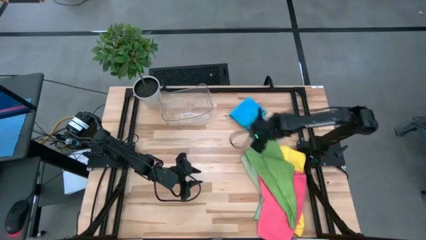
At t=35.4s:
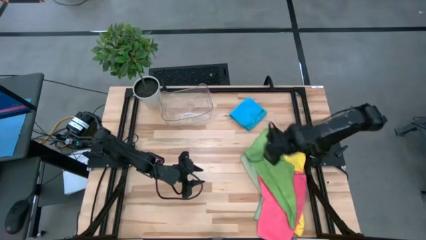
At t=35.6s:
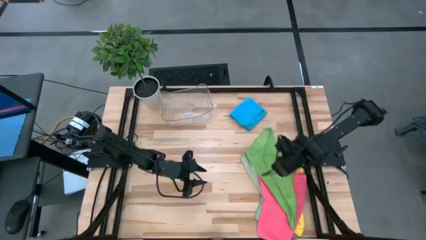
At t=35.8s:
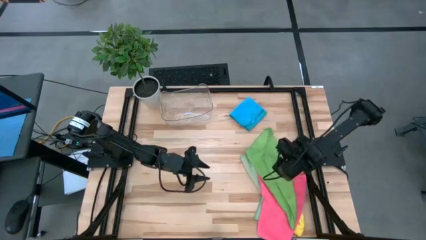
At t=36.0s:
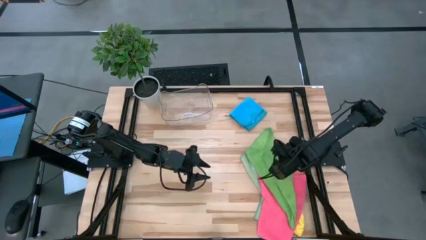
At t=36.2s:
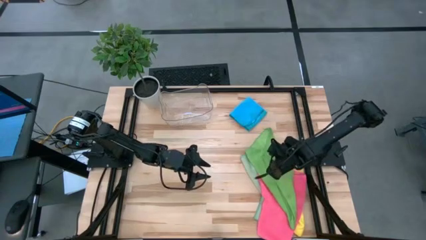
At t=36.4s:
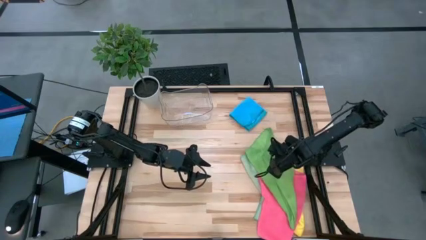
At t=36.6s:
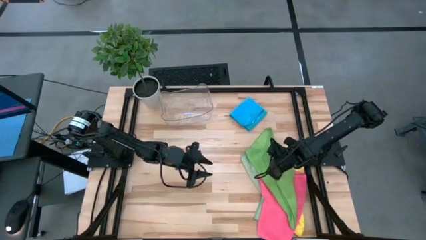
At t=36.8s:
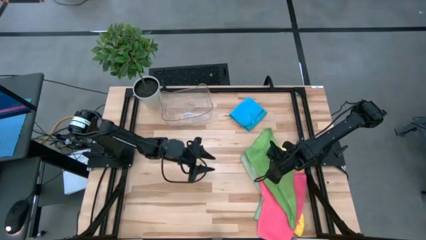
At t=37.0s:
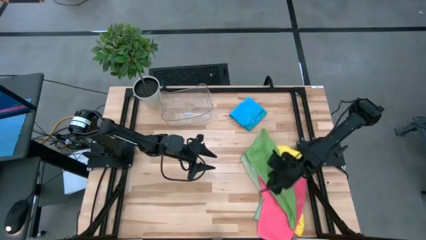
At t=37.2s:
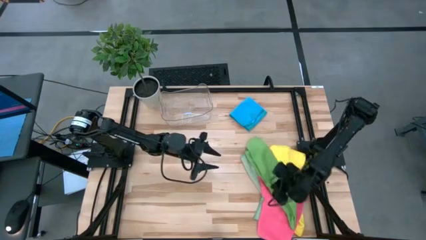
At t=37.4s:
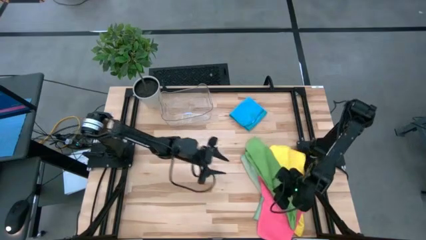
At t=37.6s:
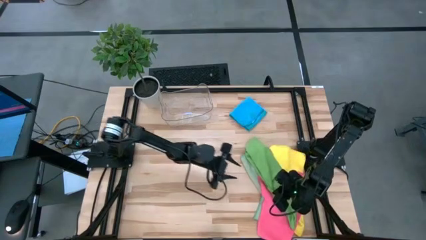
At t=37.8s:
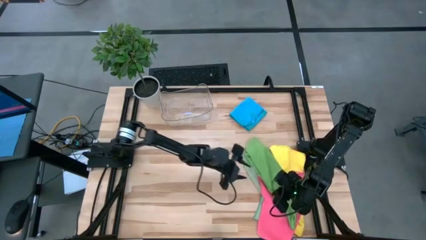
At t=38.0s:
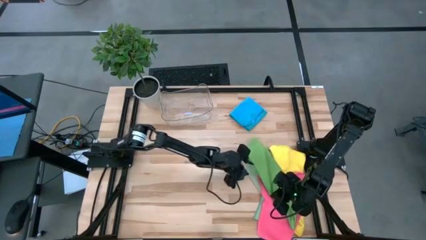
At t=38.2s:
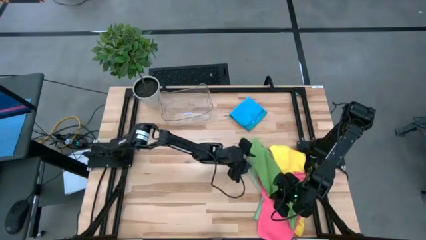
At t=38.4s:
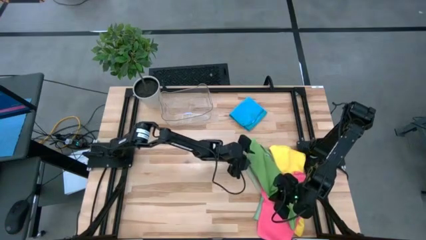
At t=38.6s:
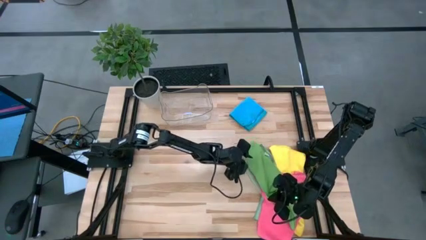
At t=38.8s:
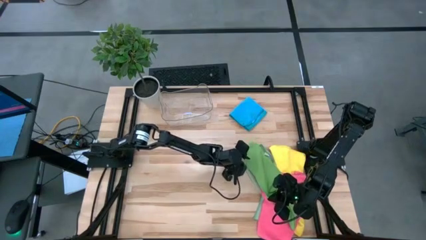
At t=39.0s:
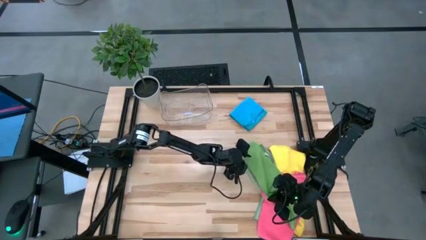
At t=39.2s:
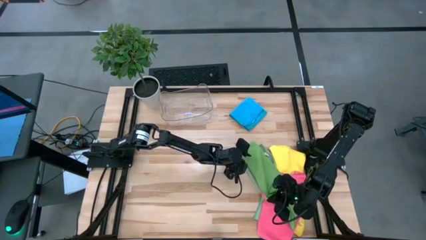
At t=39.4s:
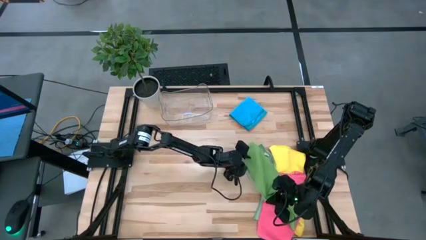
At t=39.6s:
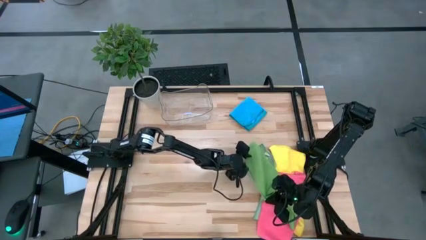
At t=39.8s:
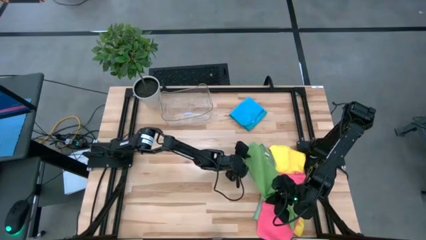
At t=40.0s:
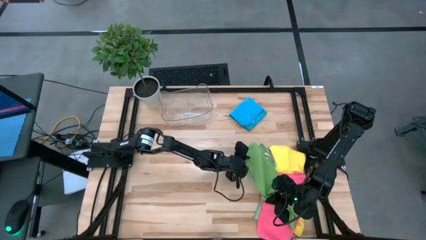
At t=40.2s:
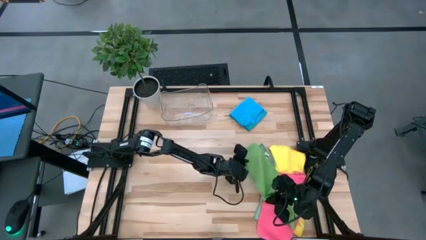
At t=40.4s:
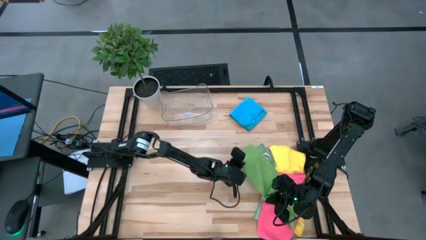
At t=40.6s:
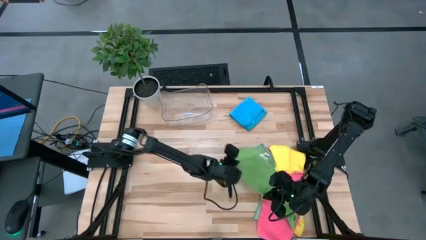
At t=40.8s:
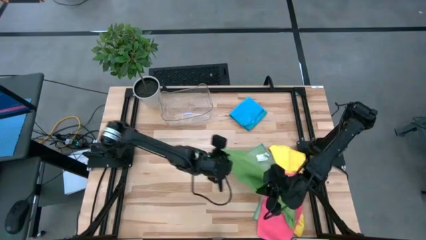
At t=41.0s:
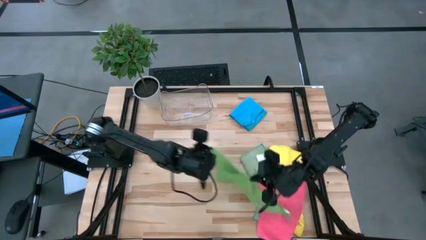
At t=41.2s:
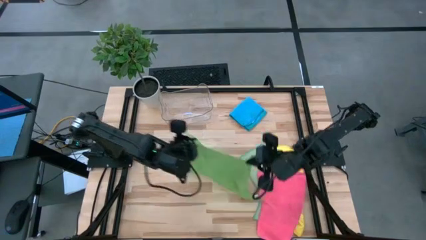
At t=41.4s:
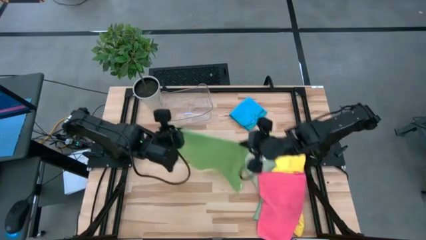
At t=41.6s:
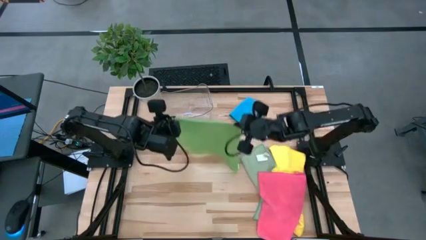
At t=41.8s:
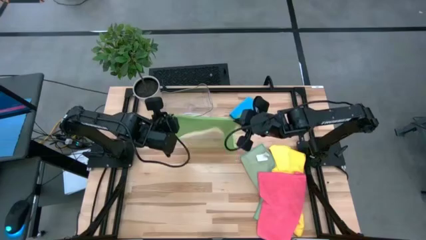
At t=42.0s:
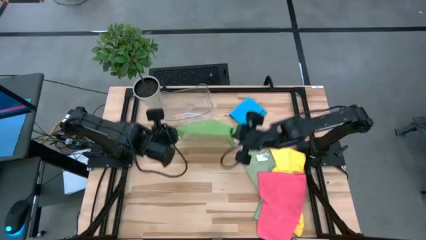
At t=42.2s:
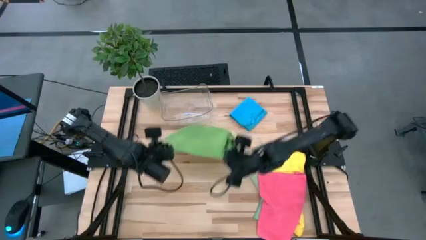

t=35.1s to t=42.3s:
Task: Fold microfiber towels
Fold the green microfiber cloth

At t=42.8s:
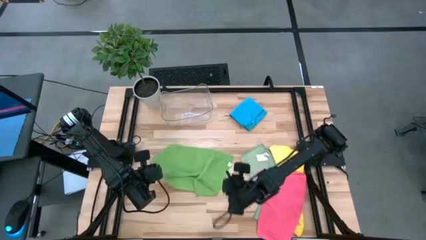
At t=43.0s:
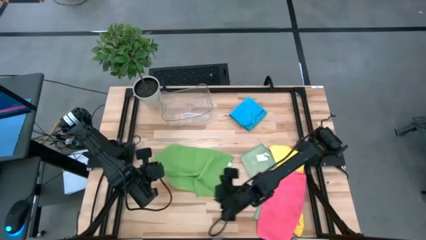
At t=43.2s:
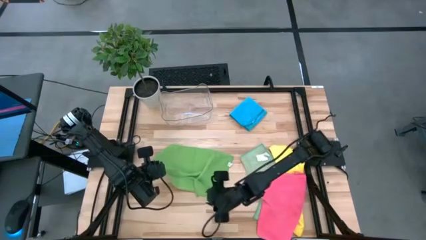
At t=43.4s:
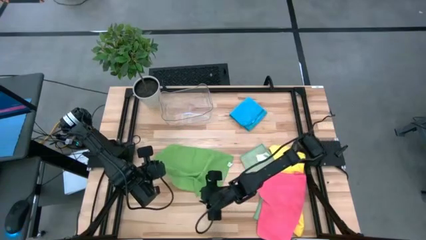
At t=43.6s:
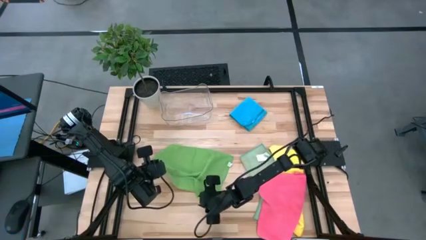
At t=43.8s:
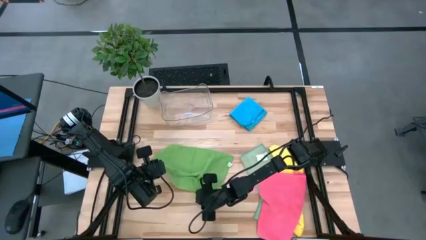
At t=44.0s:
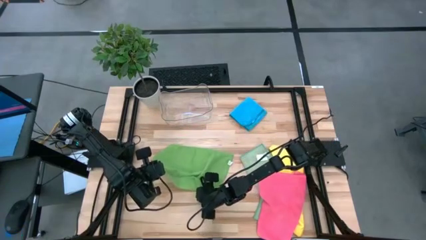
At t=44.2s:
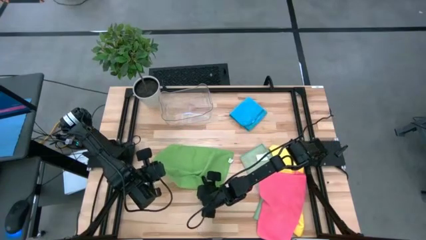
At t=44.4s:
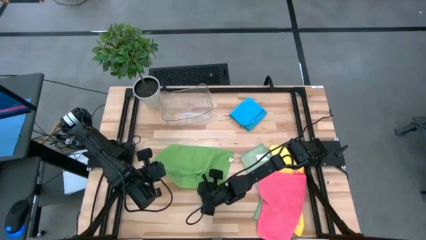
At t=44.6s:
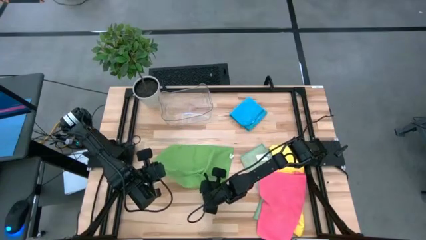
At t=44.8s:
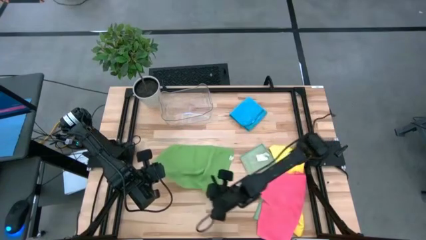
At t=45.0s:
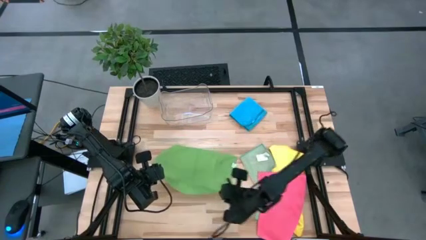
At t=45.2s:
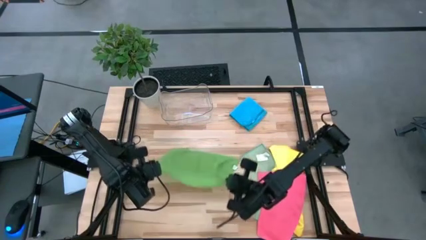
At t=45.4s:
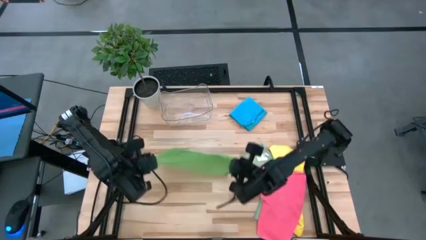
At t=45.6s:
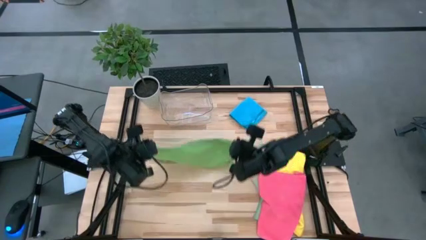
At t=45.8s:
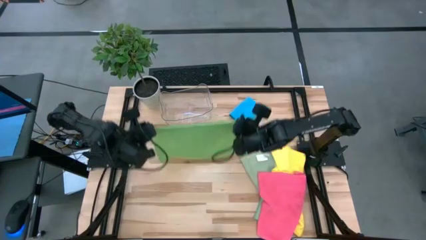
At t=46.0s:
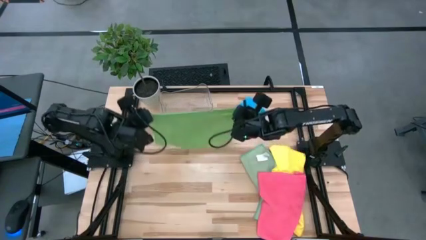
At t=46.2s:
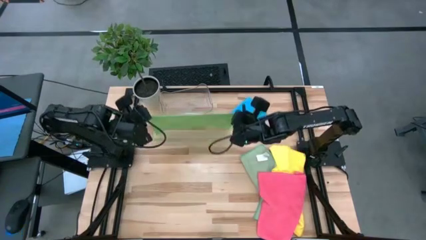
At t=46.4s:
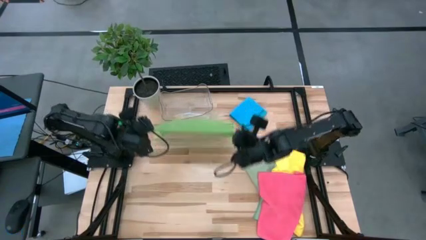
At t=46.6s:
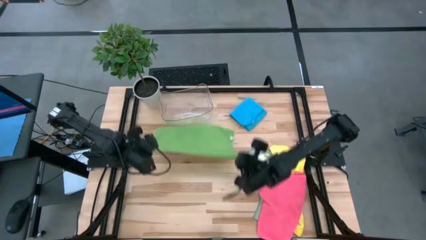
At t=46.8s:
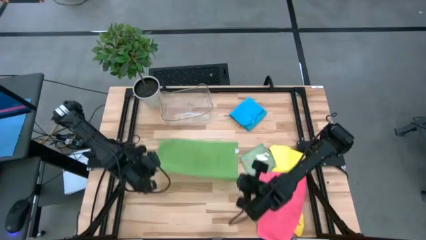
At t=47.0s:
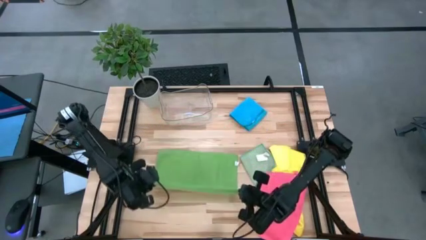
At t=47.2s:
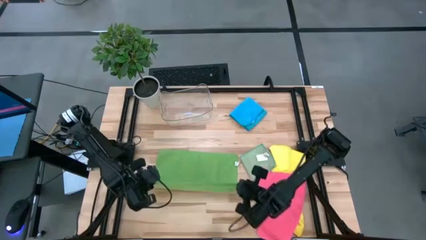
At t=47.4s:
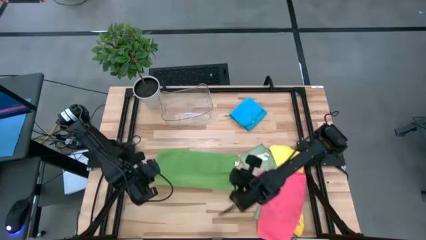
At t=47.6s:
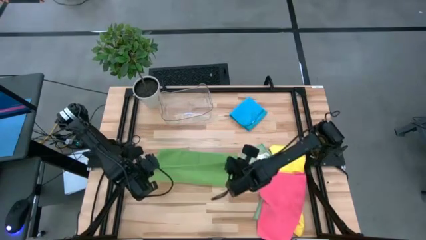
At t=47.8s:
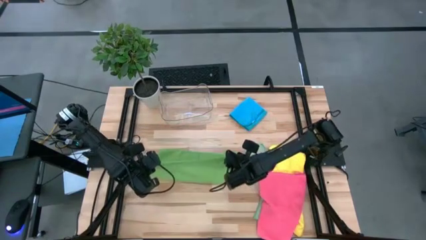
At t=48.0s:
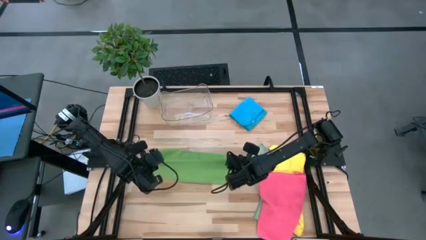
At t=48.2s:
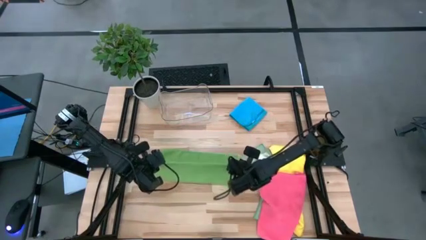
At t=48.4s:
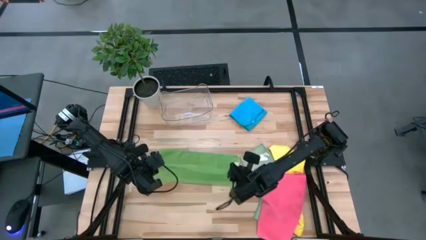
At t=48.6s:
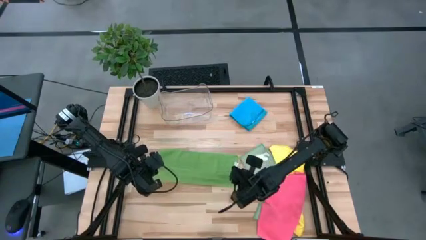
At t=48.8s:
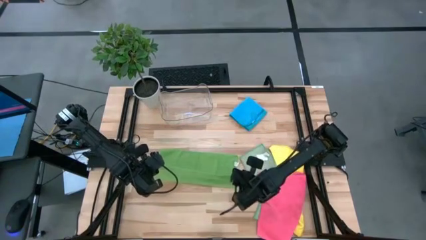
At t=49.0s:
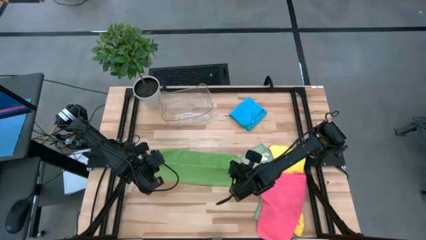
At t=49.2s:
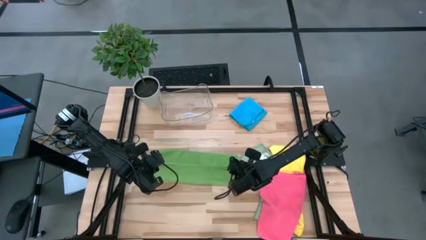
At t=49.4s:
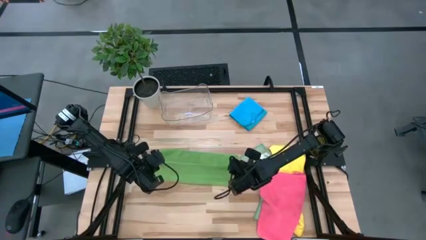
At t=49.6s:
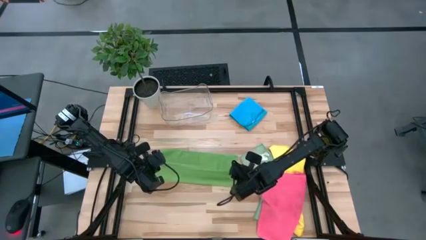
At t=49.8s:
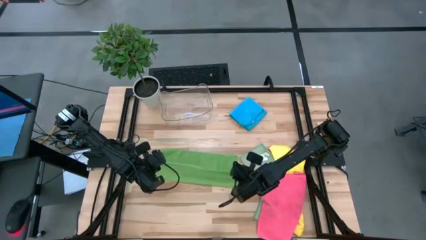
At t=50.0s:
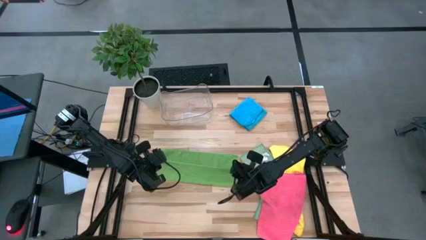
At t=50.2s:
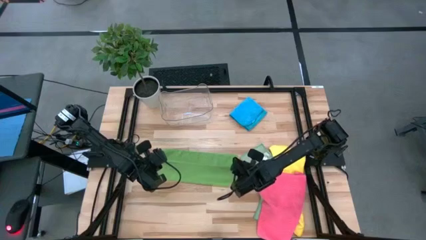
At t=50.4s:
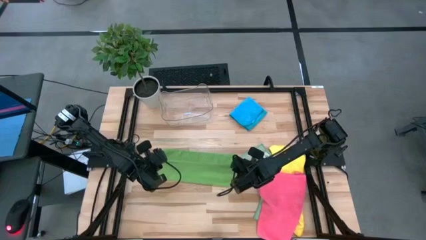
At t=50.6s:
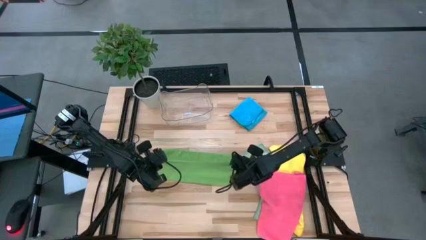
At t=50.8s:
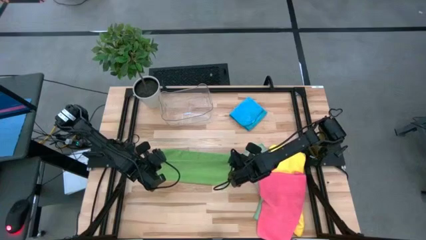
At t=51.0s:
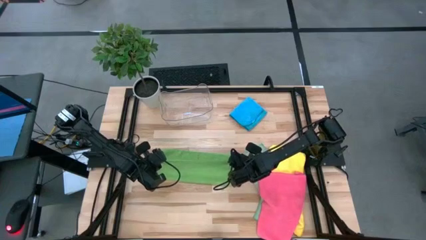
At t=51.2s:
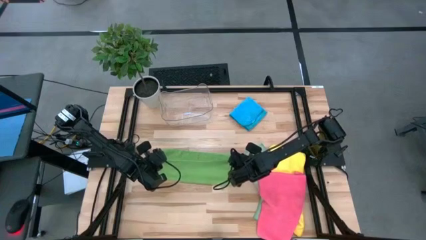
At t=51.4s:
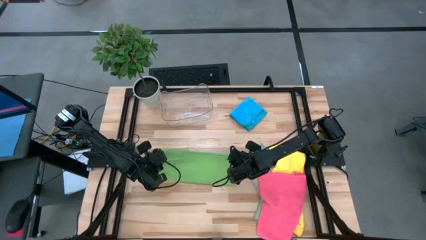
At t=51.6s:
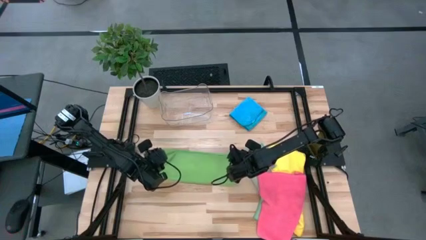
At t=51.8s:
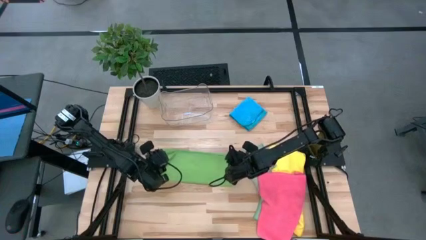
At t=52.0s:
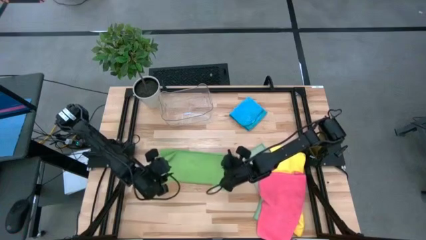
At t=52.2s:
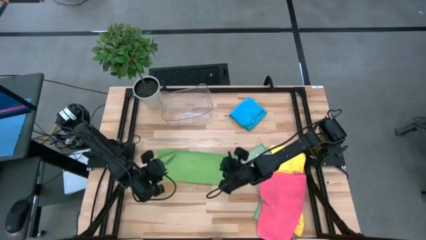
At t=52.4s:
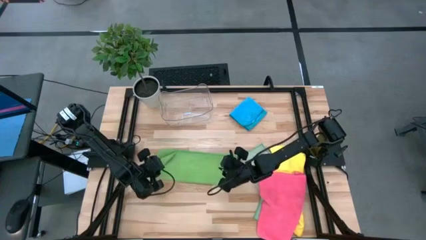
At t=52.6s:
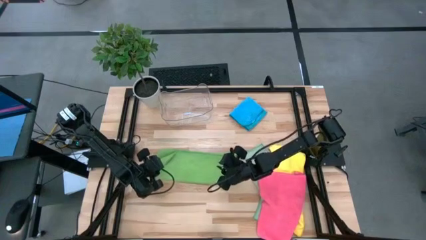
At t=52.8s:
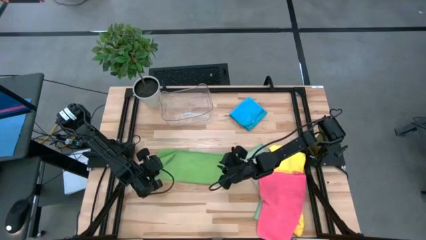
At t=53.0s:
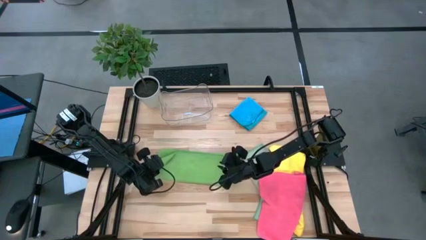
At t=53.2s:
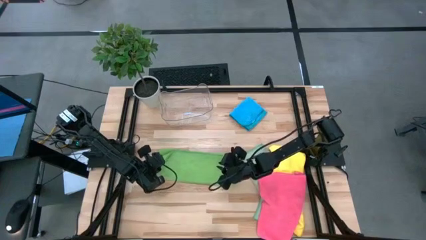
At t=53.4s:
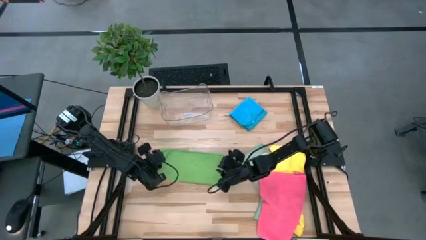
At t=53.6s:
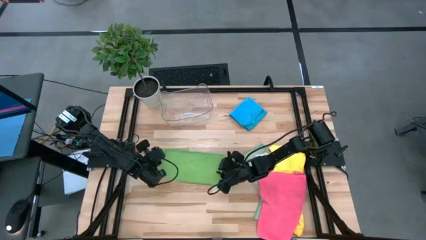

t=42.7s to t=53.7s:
Fold the green microfiber cloth
